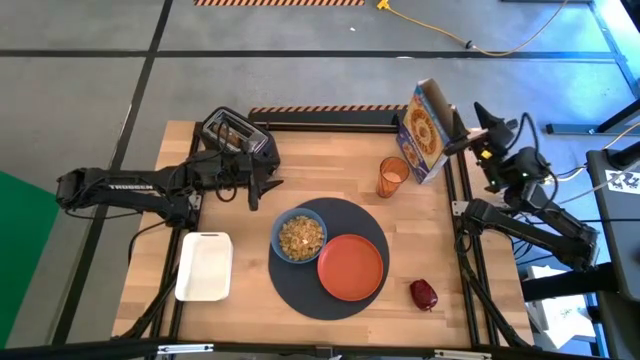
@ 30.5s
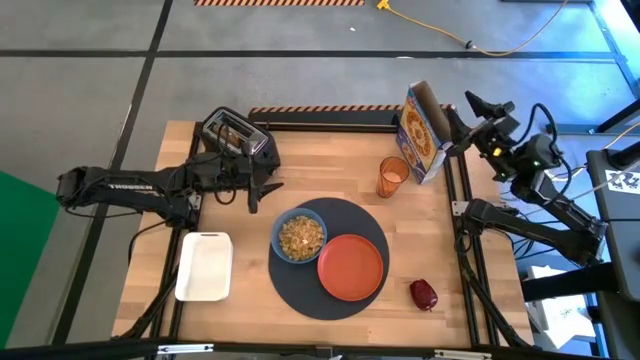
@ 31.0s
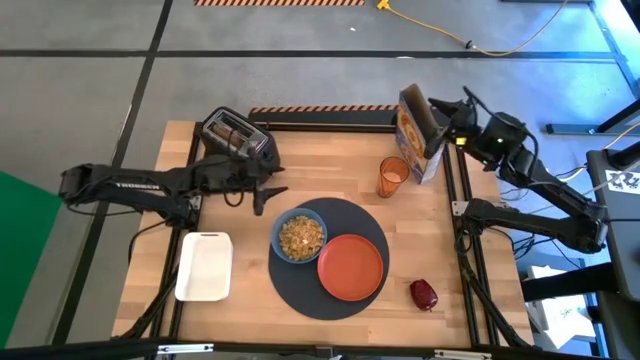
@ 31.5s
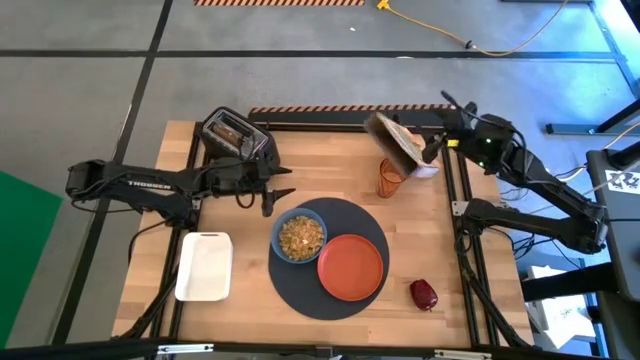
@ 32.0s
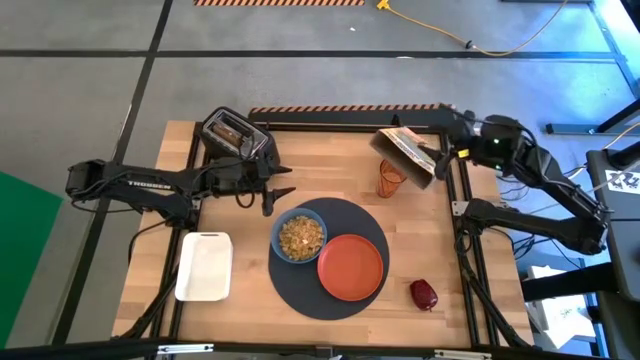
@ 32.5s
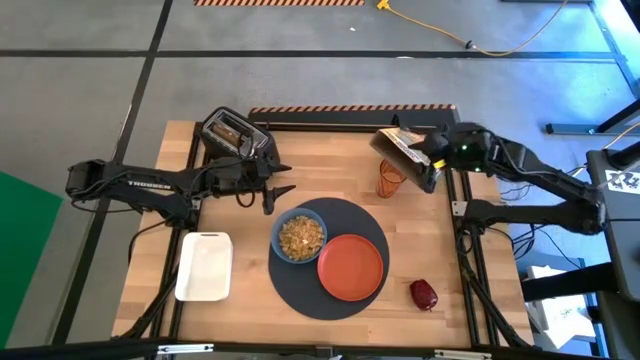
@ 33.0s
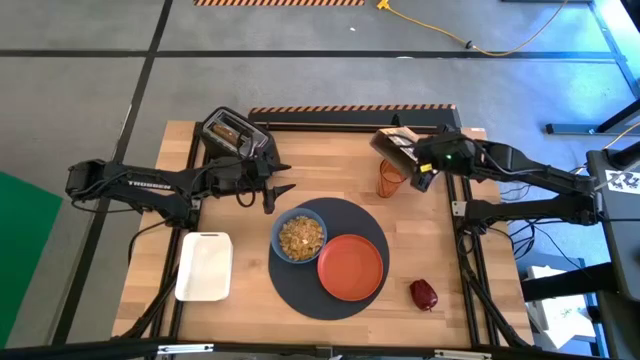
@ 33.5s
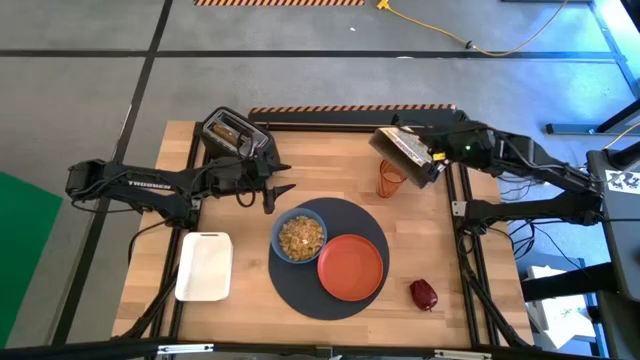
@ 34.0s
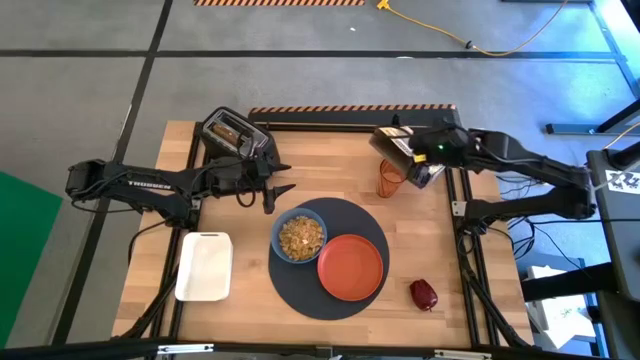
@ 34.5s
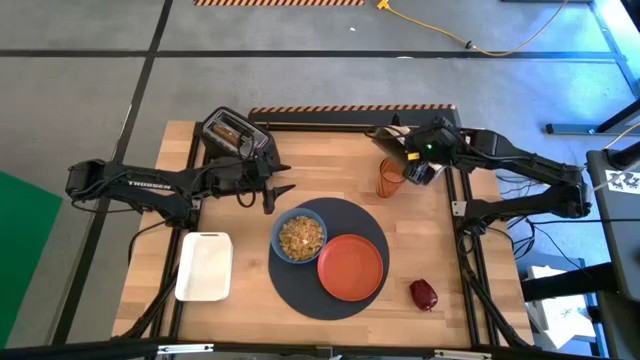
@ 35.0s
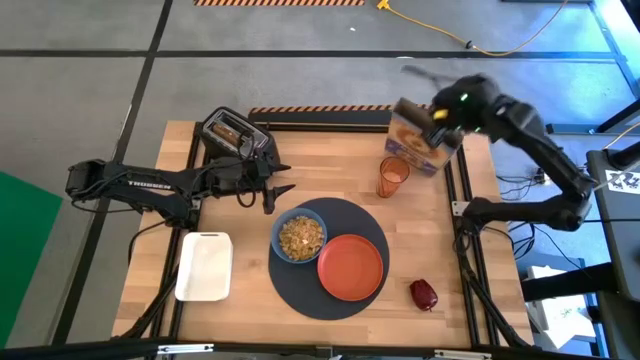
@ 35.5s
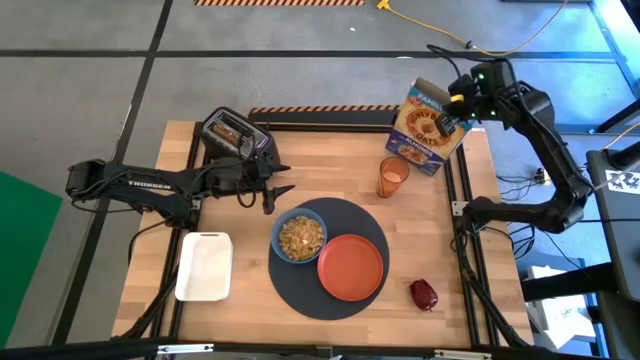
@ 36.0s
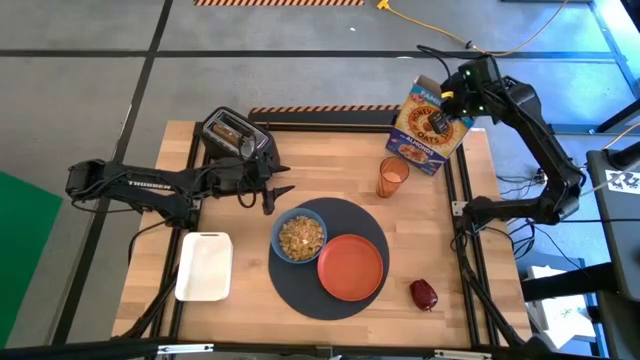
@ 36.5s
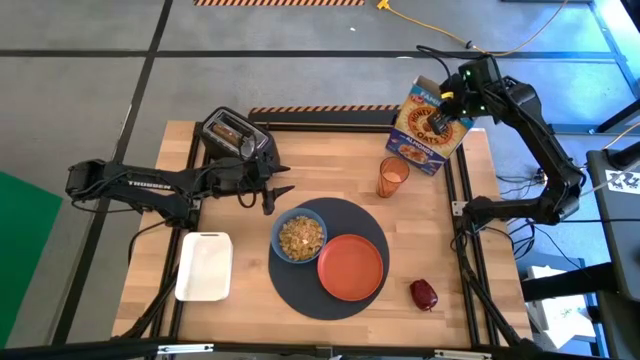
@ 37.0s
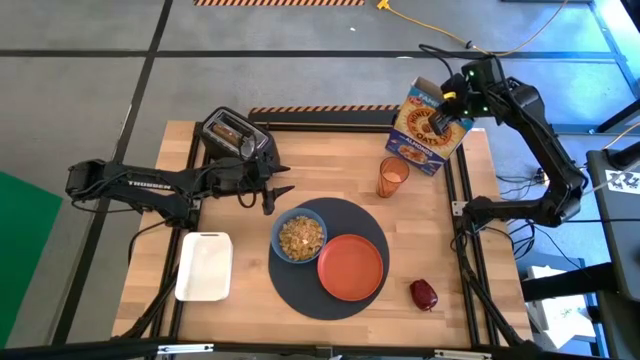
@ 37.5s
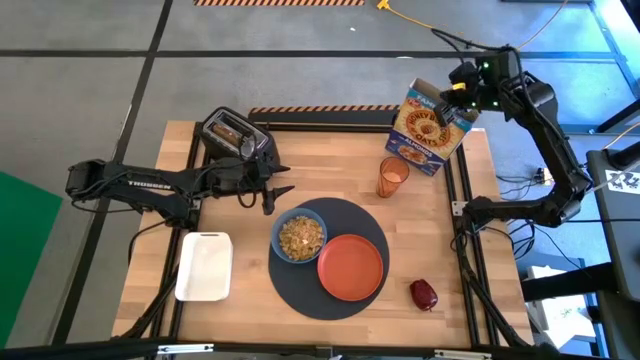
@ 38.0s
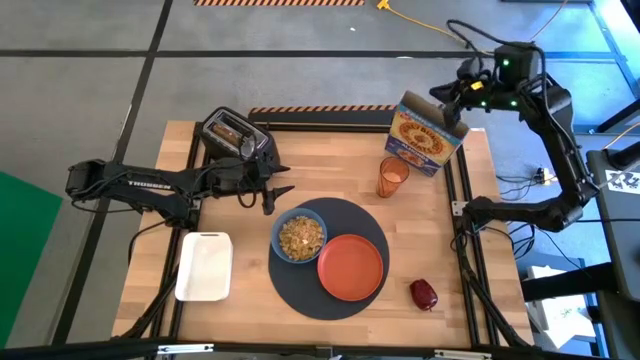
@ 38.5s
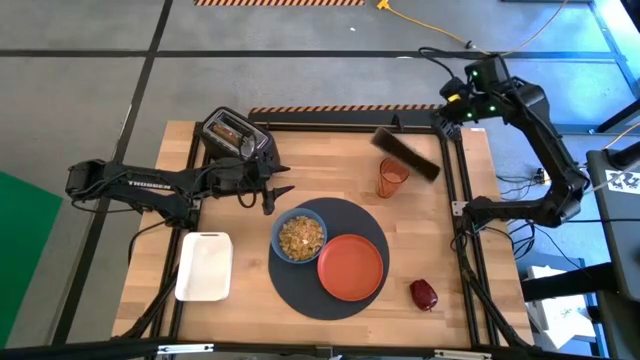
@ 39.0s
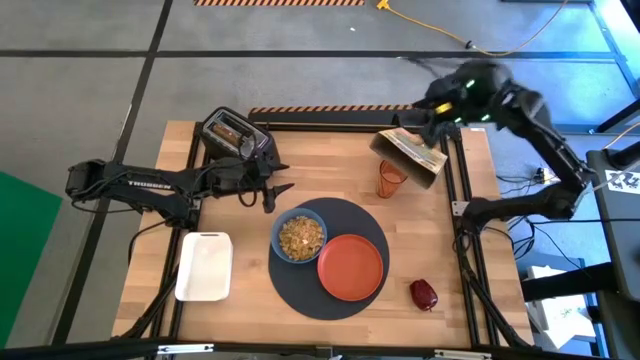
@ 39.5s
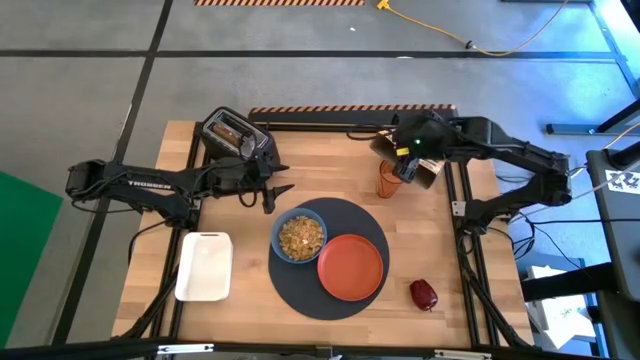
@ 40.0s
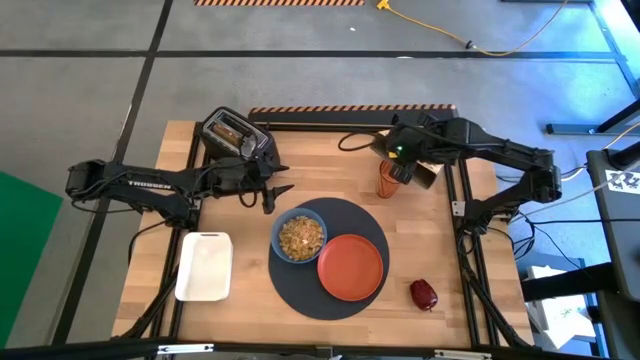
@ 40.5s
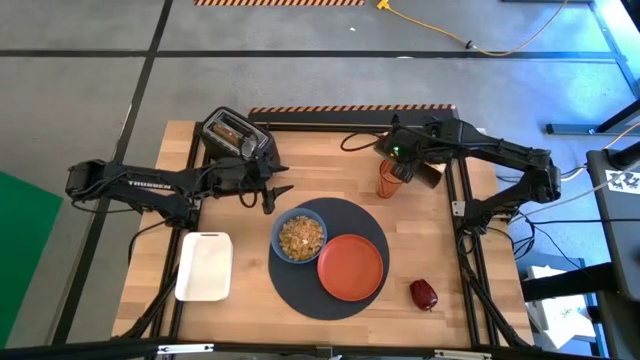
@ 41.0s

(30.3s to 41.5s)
Task: Arrange a breakfast setting
Adjust the cereal box

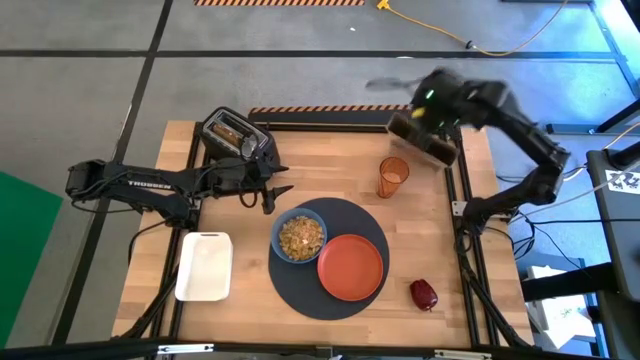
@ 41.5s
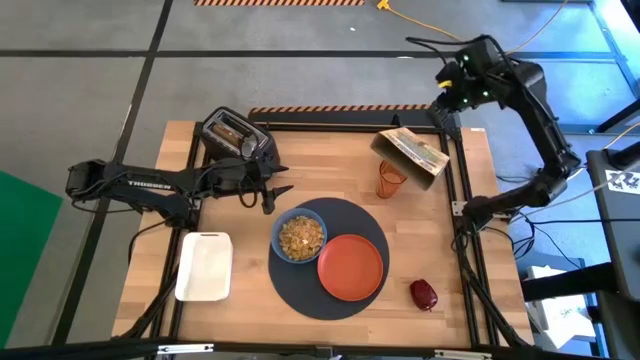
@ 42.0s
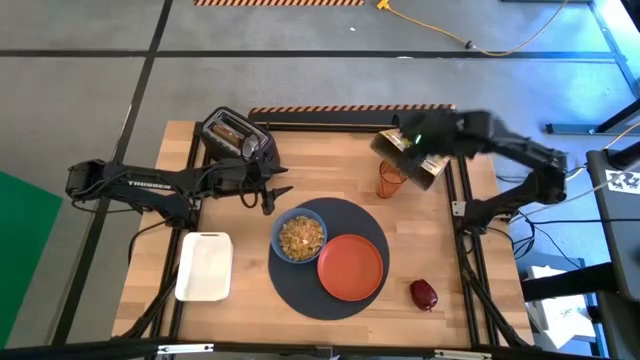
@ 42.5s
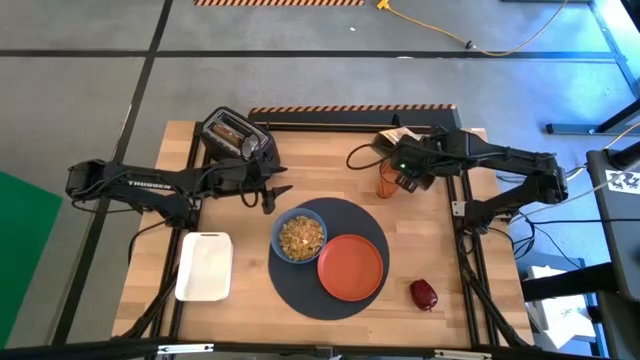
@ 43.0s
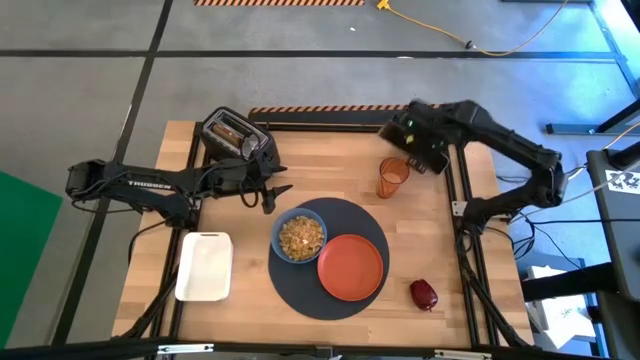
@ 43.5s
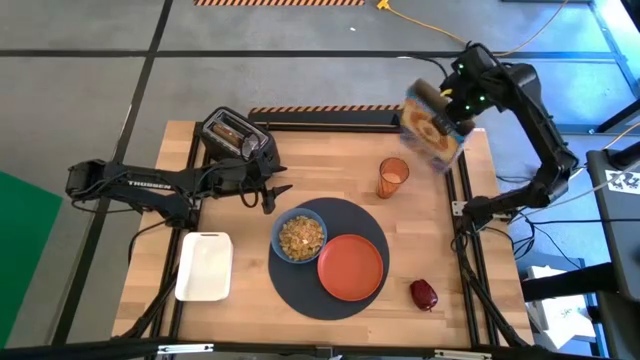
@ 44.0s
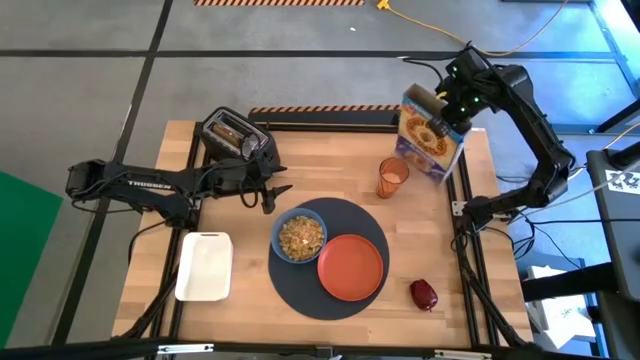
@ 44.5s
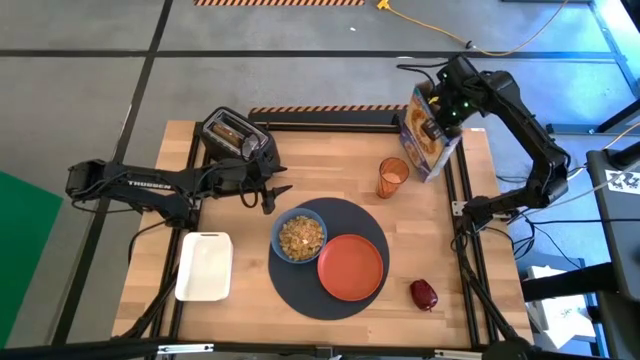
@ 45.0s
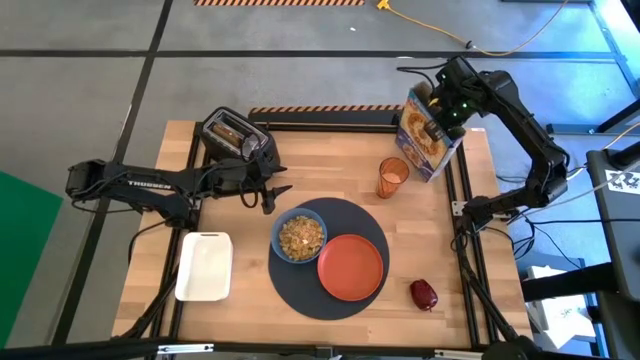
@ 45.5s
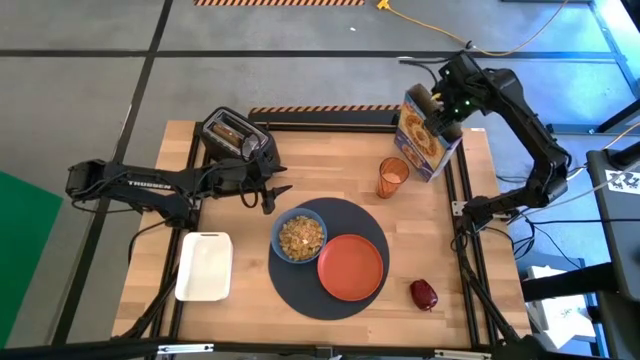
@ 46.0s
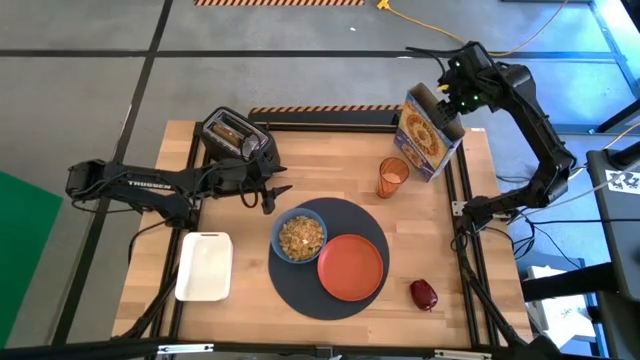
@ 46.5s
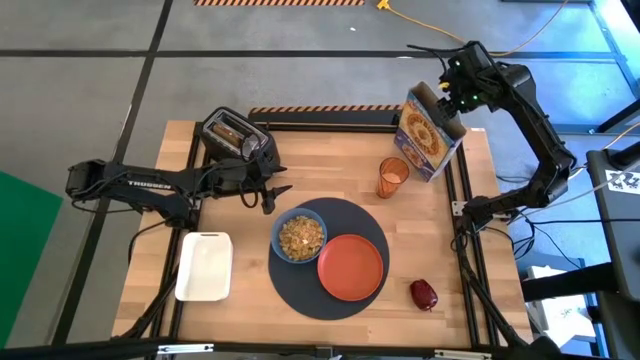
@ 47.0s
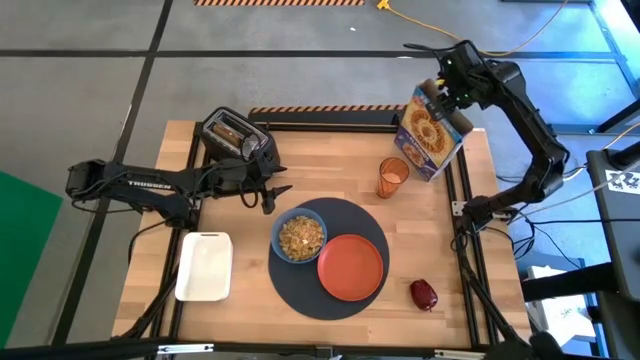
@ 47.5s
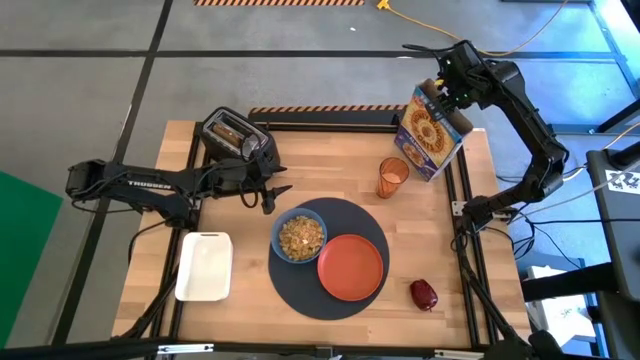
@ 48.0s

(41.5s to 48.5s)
Adjust the cereal box

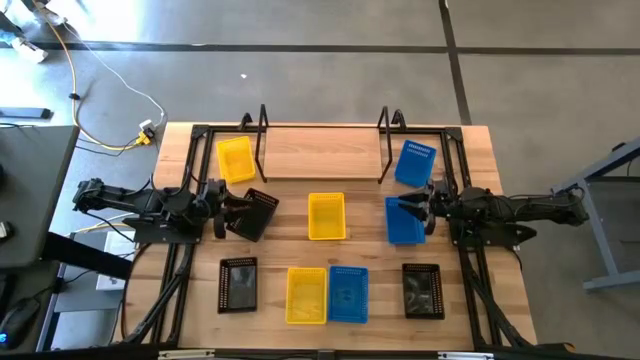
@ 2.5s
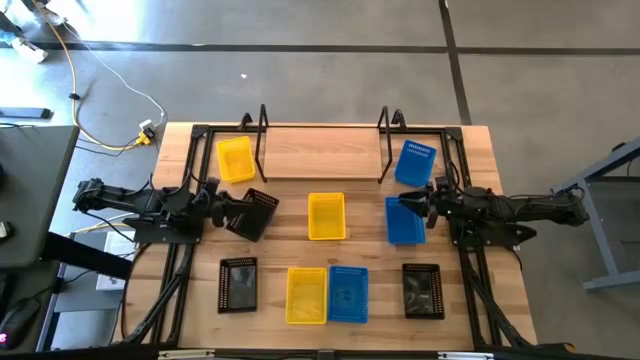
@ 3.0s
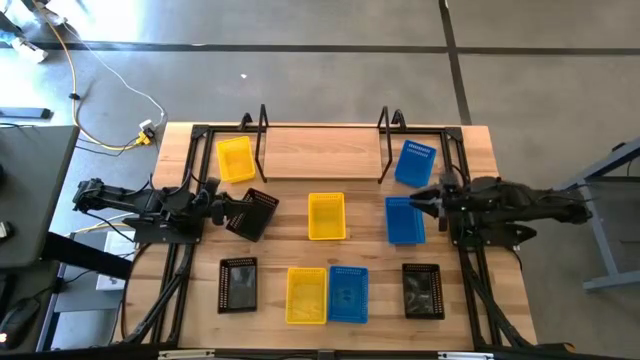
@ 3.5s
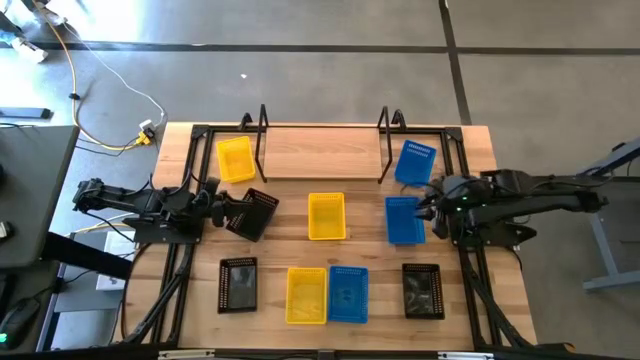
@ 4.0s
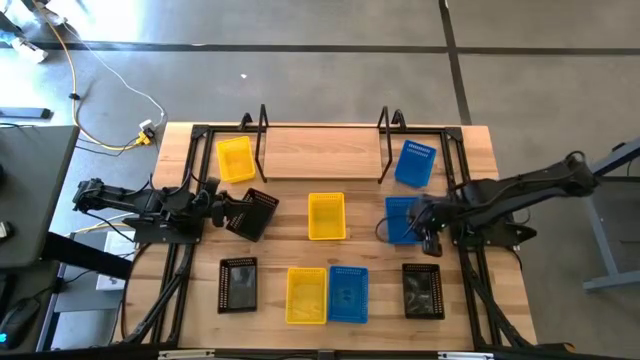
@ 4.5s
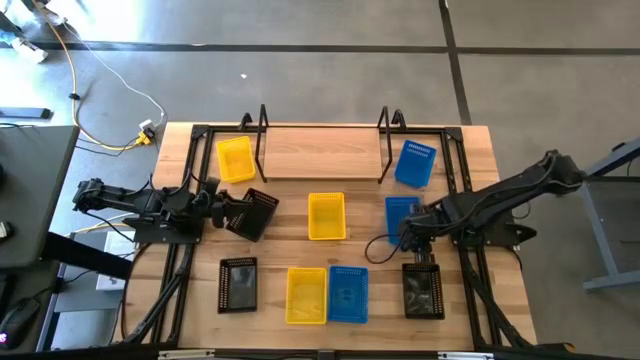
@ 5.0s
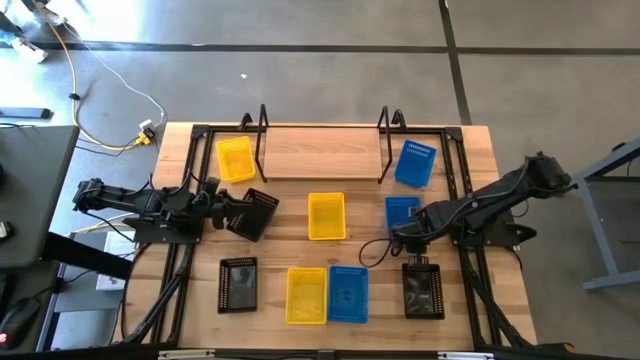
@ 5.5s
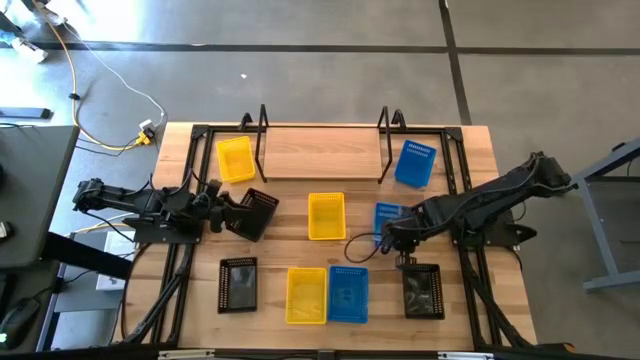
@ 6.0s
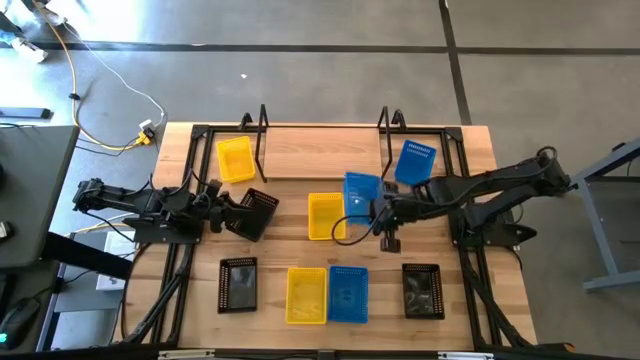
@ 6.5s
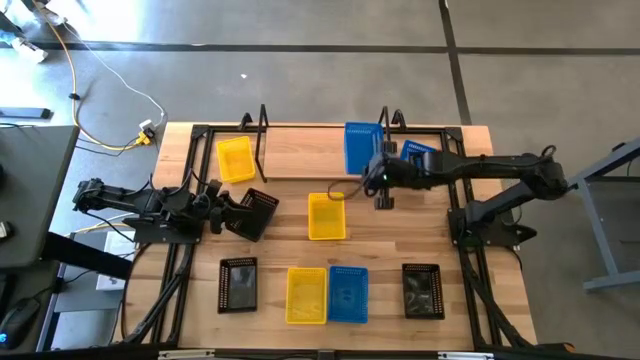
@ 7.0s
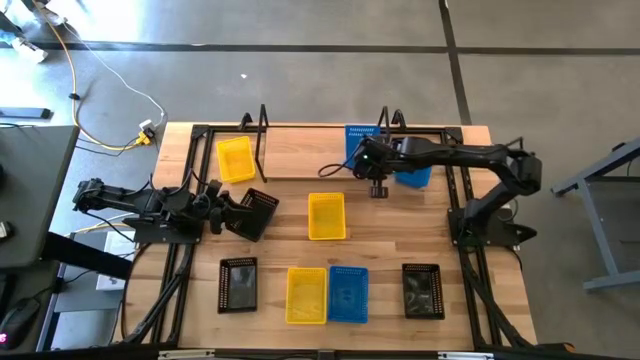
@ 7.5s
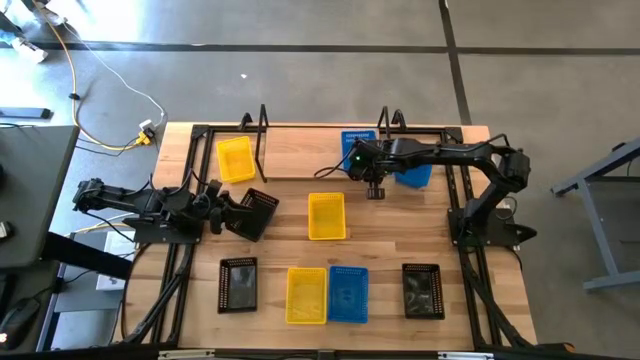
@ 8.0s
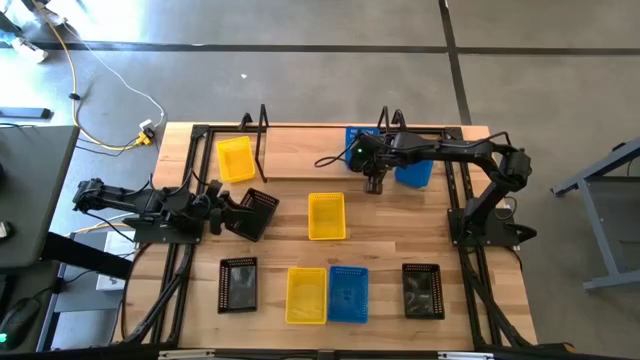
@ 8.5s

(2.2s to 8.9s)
Task: Stack baskets on shelf by color
Put the middle blue bin on the shelf
